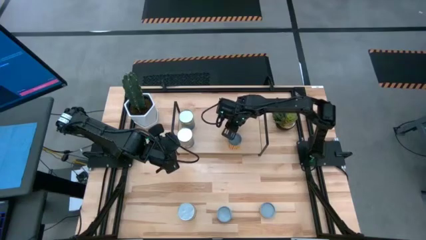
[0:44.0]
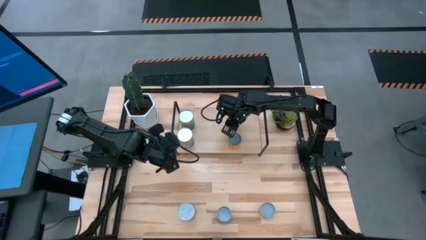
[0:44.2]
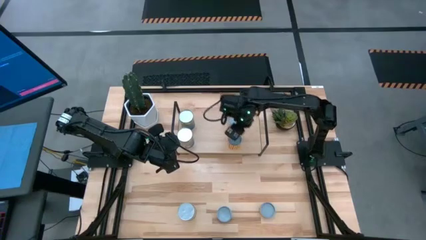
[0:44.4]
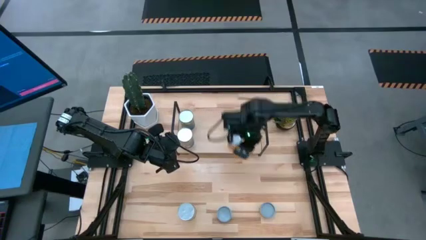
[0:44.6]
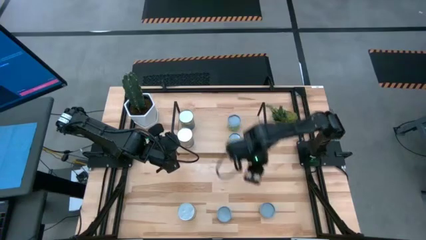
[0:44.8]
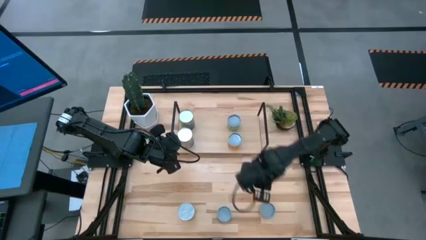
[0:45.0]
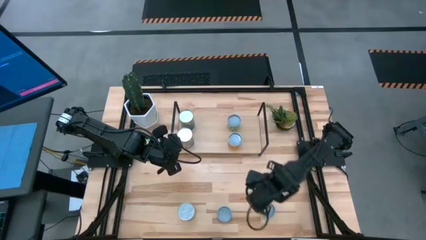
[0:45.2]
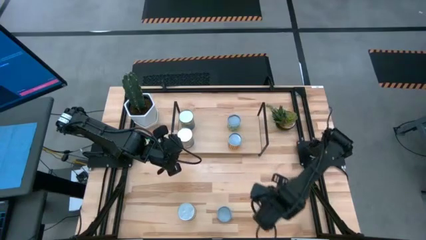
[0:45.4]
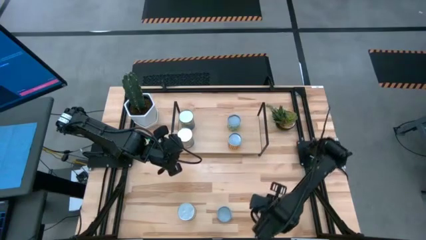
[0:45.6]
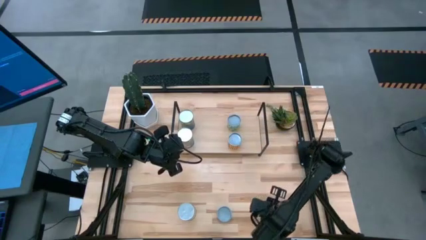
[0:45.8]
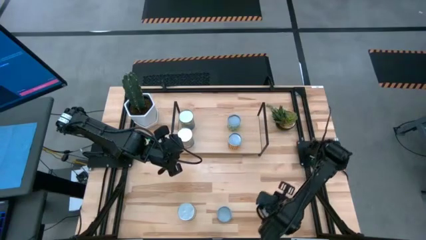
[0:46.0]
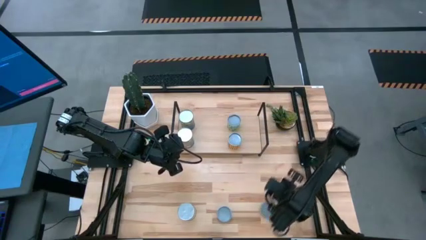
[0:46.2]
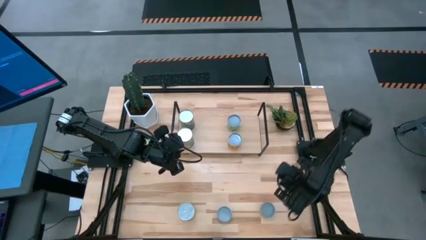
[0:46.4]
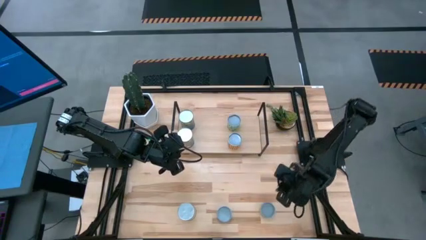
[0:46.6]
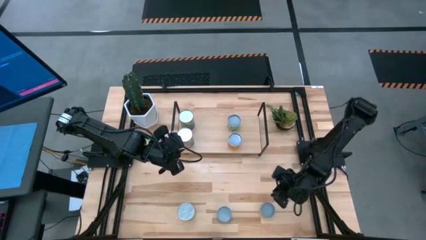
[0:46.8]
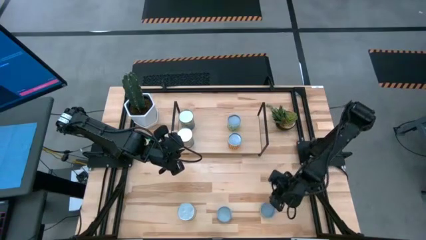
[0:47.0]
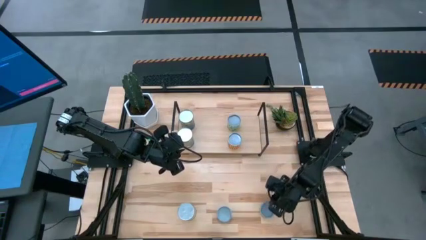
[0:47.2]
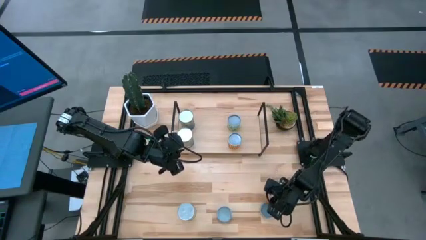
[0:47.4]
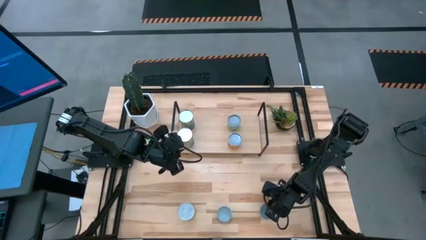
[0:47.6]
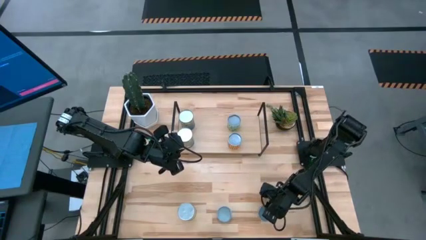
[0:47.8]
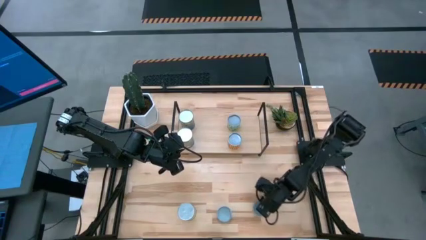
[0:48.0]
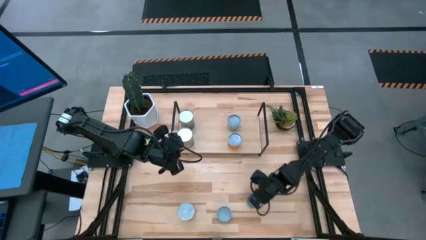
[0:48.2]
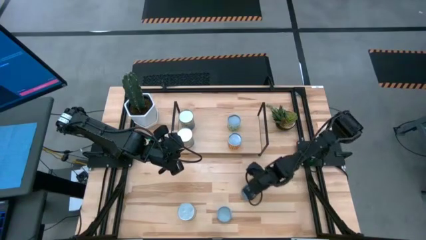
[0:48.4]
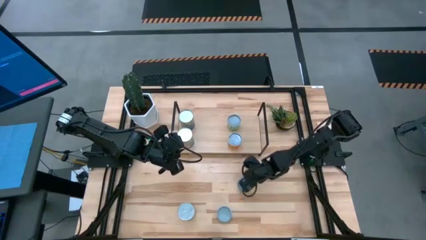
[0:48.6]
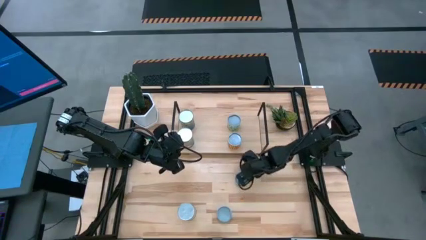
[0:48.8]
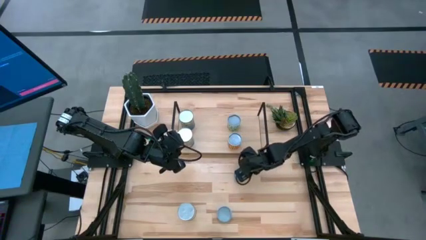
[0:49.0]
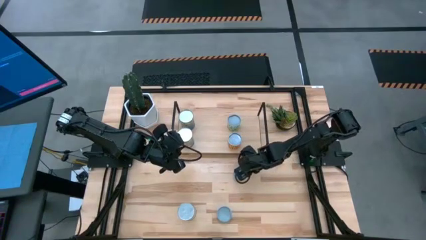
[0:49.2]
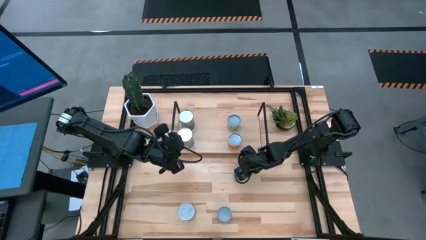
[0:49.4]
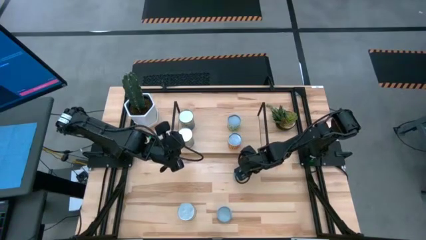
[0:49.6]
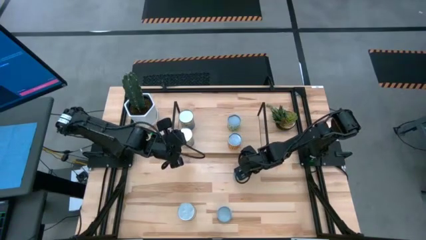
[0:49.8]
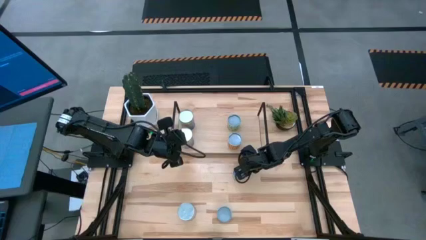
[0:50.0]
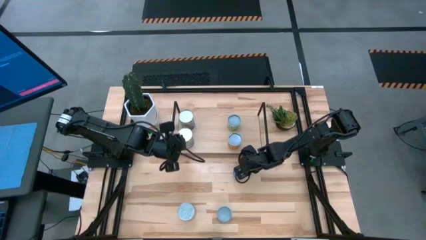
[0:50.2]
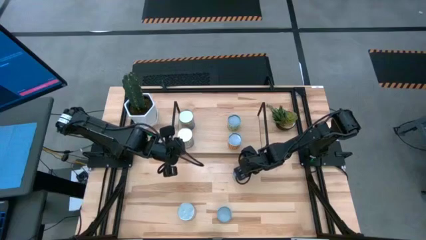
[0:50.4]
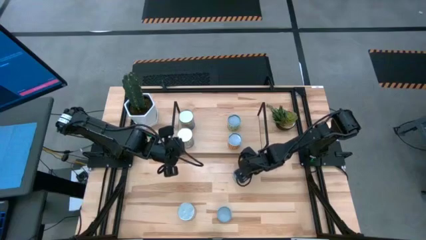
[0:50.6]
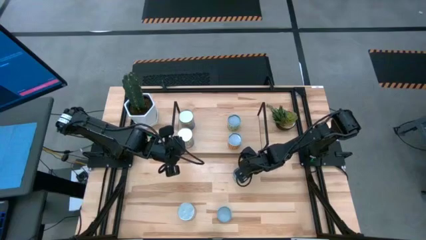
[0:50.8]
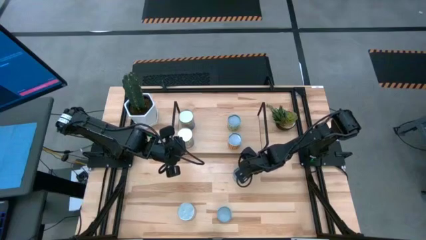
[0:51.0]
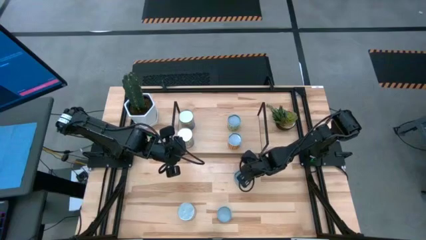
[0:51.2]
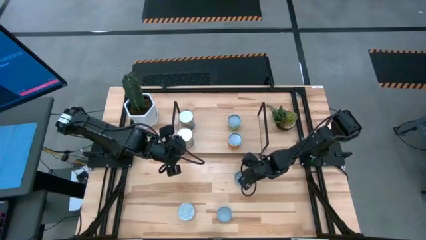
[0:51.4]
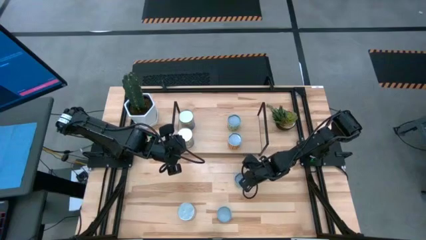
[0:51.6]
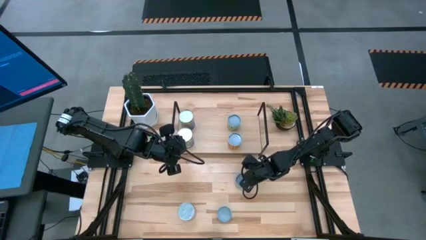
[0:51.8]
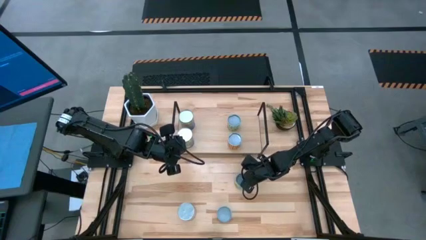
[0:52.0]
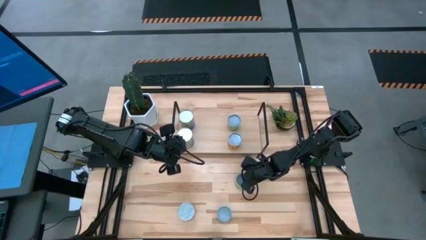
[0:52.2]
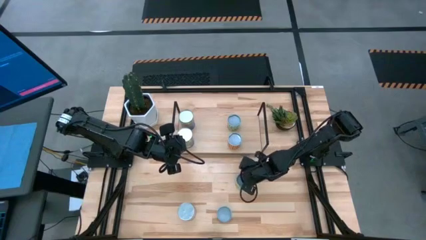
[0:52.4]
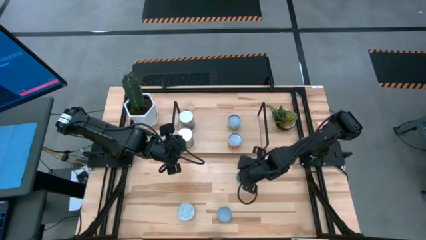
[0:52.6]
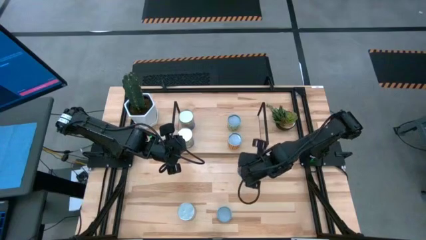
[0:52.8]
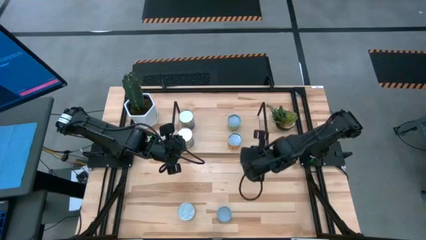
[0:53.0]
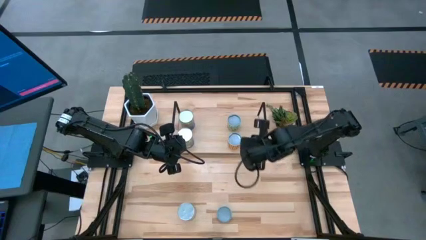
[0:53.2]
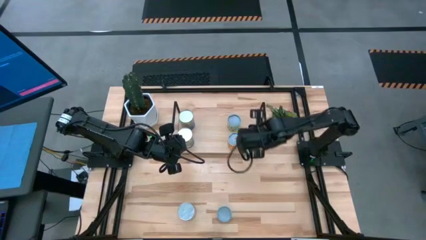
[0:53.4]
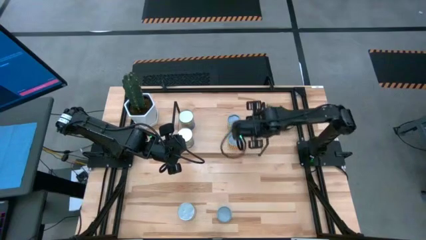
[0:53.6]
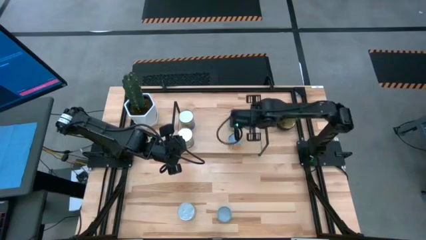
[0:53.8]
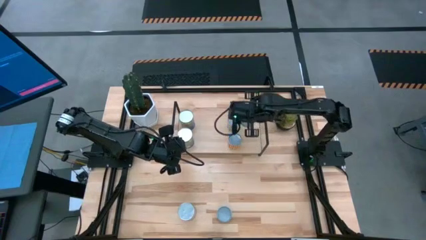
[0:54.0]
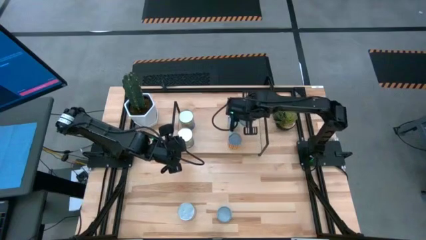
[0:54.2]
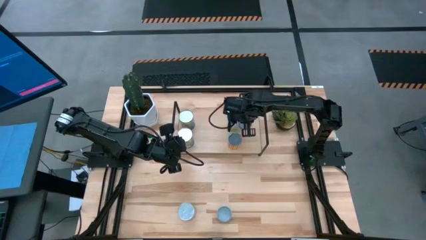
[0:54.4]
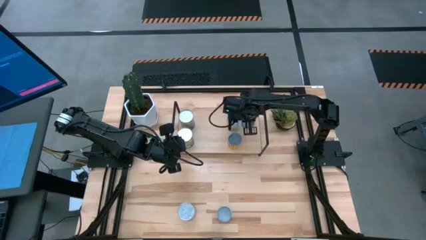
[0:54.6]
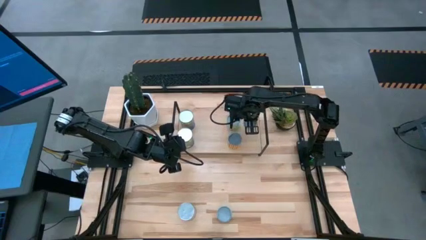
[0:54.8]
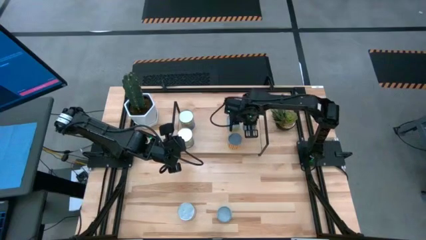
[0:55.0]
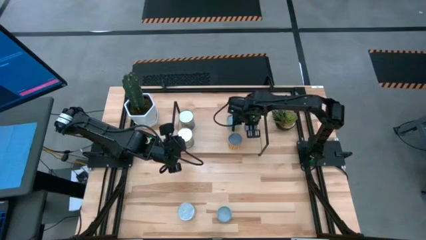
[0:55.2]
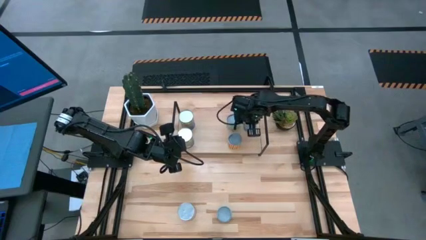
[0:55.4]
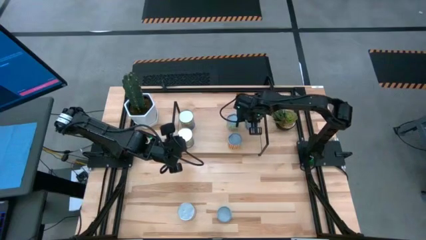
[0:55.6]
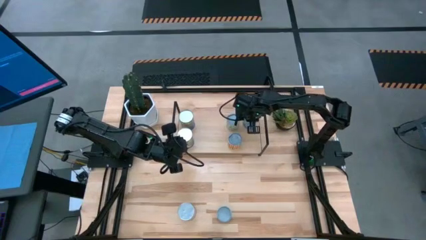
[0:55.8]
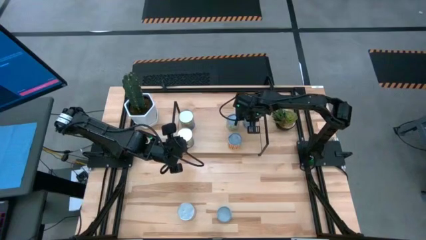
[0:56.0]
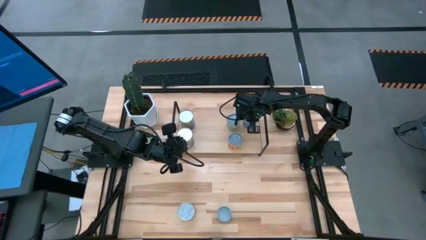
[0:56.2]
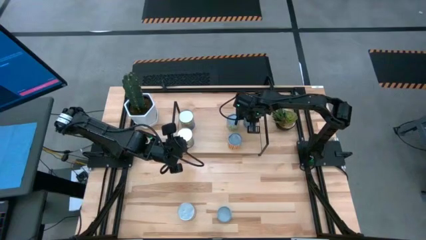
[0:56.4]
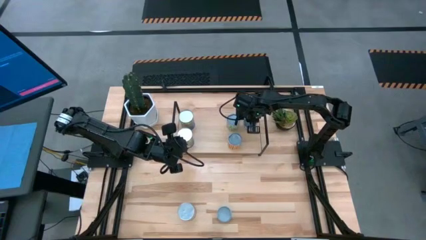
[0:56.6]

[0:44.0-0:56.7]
Task: Pick and place cans onto a shelf
Put the canned meatballs on the shelf

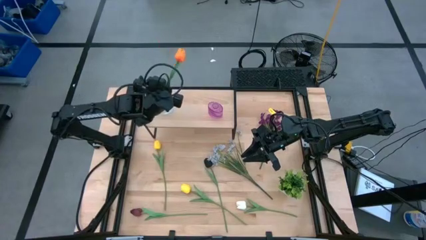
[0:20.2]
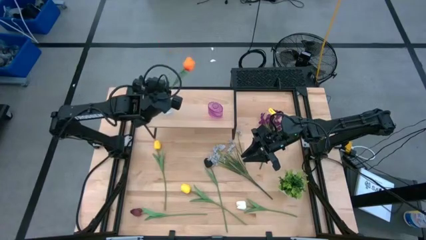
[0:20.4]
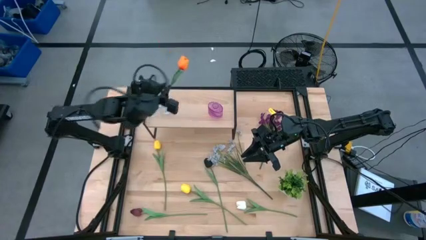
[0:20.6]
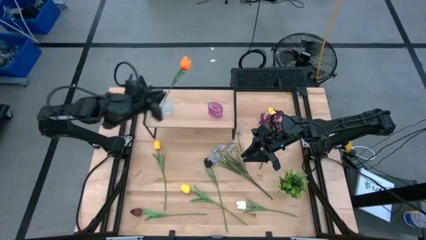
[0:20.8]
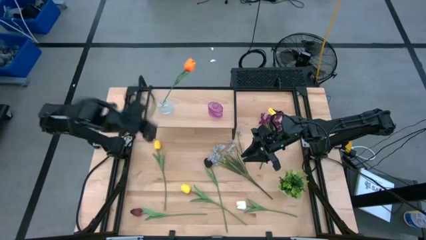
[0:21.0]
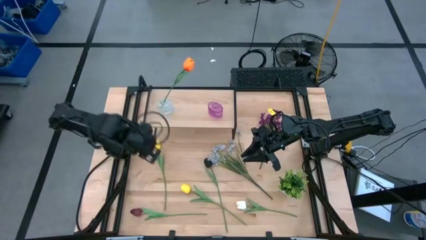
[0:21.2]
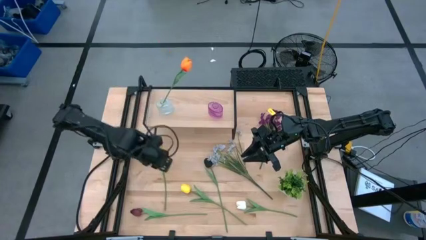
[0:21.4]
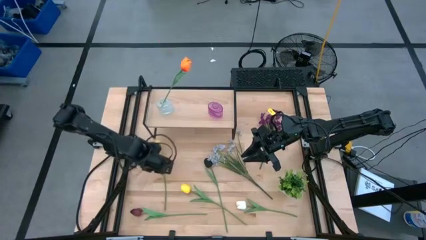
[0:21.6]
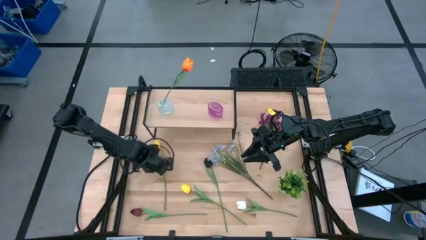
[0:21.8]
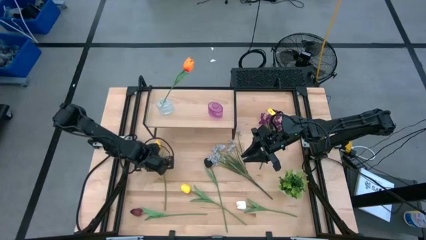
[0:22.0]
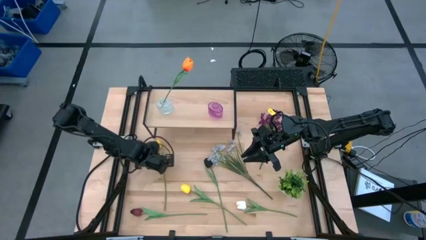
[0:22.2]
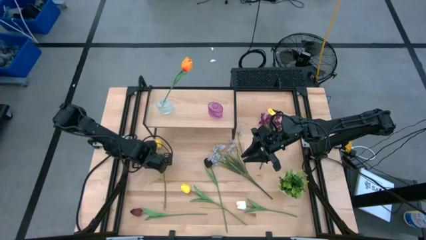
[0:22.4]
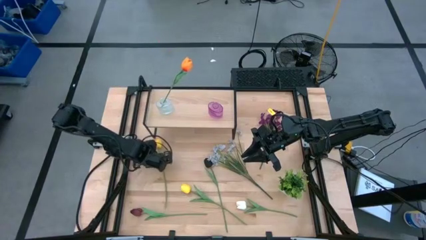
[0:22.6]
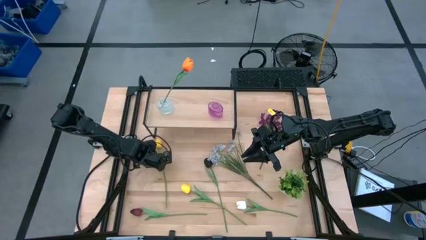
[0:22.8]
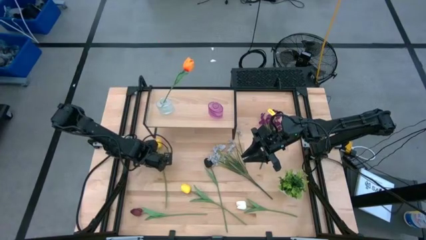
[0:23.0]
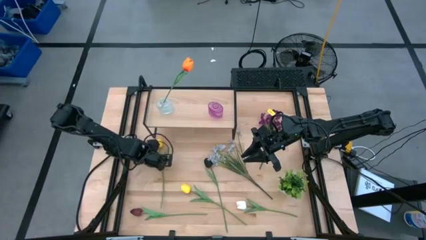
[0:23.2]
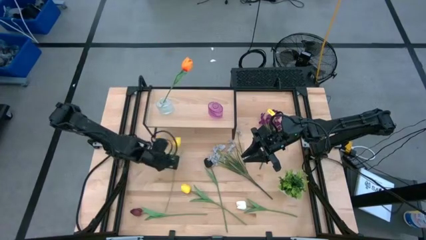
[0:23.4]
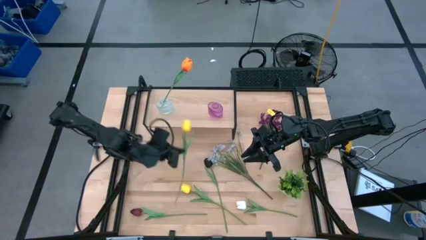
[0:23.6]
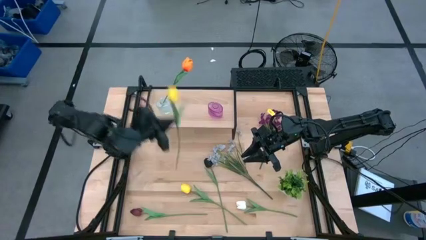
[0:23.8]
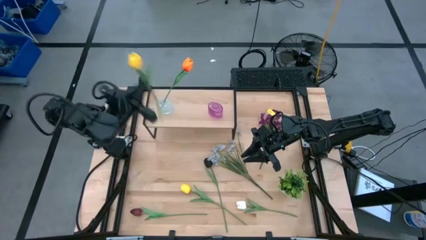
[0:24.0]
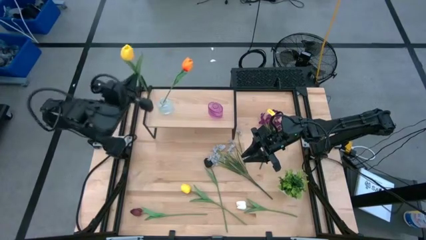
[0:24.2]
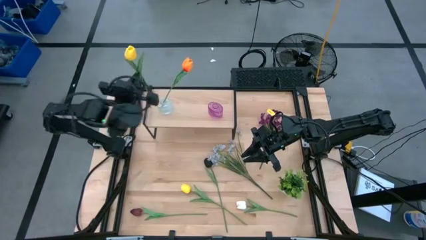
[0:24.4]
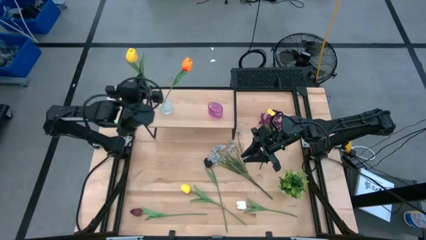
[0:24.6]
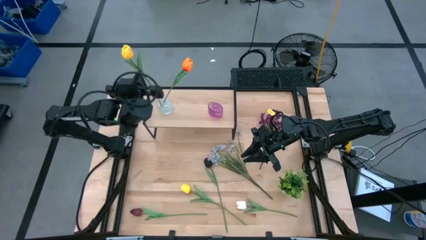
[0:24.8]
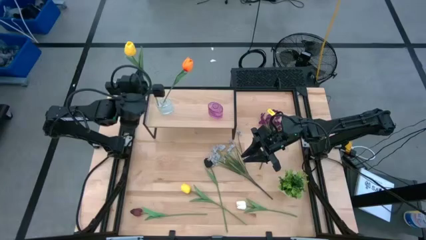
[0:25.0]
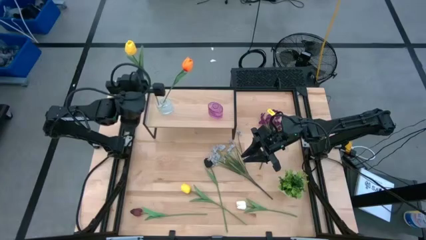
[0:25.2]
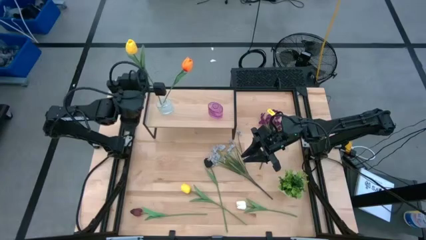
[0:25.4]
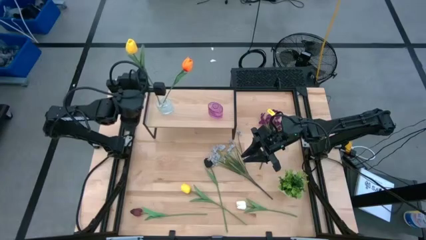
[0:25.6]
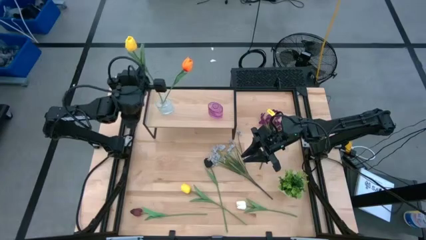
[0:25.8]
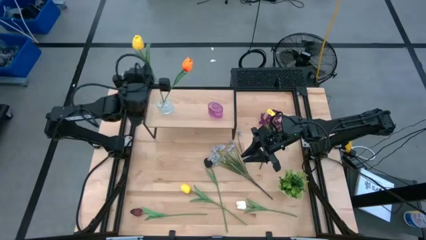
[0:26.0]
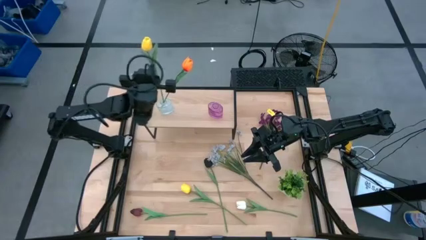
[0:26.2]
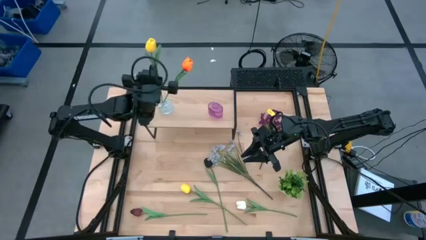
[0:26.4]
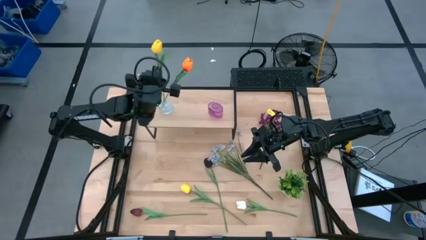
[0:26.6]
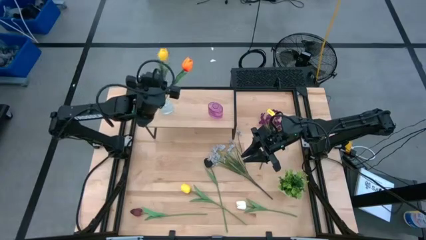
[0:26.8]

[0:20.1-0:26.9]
Task: Pick and place flowers into a vace then onto a shelf
Put the top yellow flower into the transparent vase on the shelf
